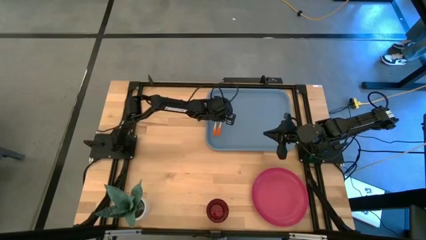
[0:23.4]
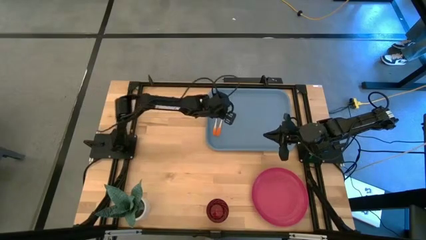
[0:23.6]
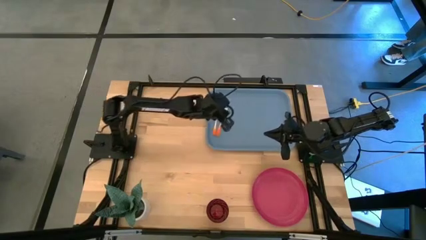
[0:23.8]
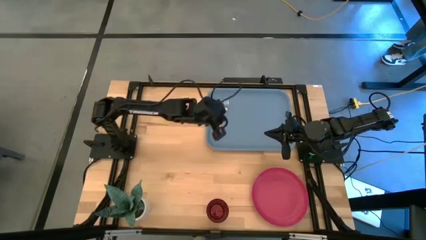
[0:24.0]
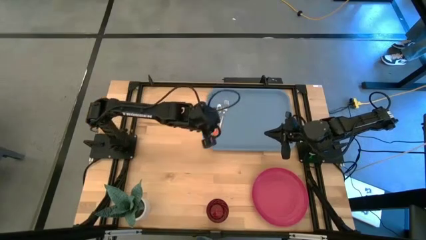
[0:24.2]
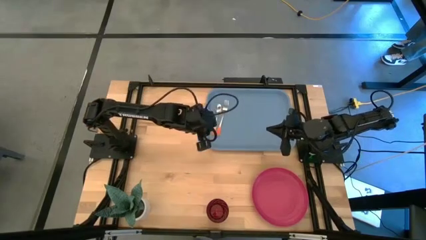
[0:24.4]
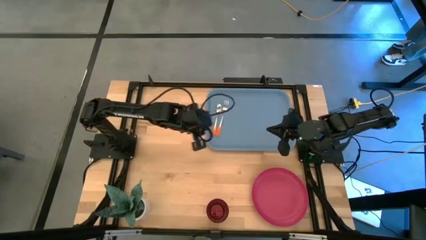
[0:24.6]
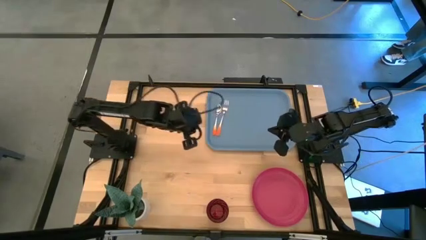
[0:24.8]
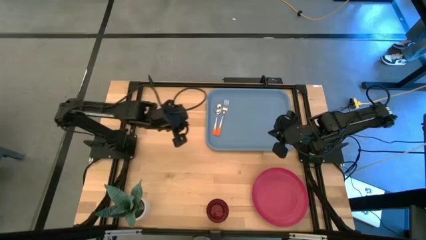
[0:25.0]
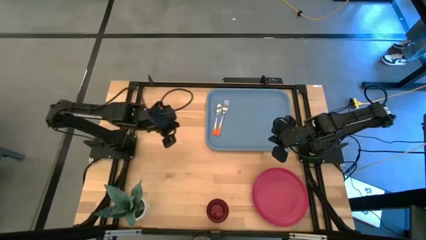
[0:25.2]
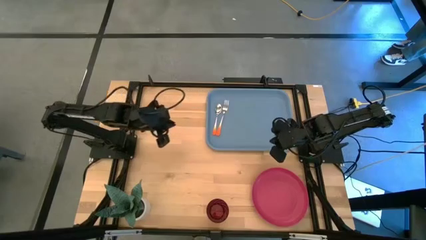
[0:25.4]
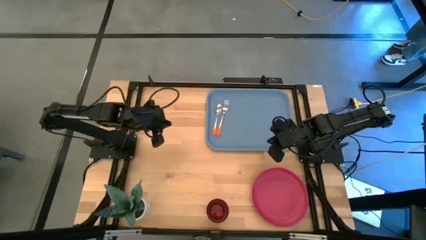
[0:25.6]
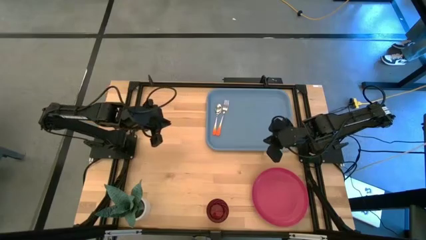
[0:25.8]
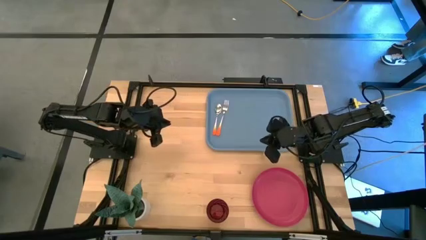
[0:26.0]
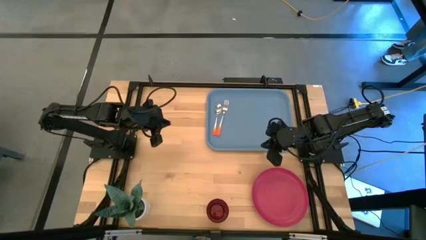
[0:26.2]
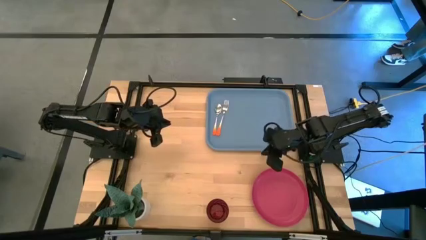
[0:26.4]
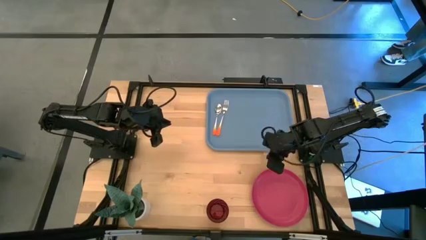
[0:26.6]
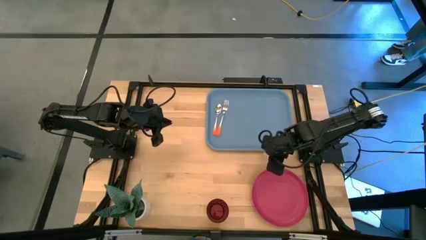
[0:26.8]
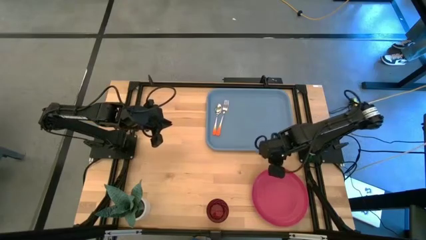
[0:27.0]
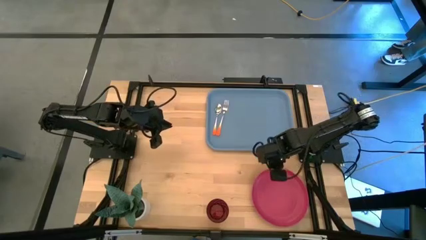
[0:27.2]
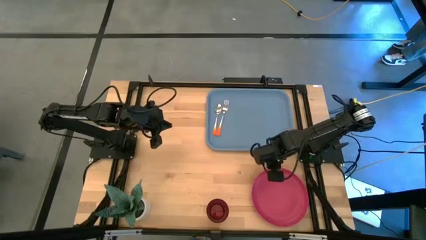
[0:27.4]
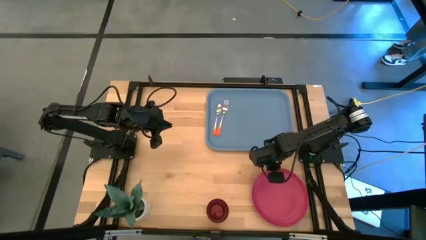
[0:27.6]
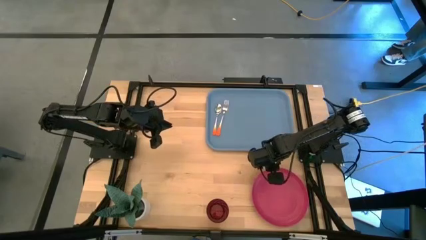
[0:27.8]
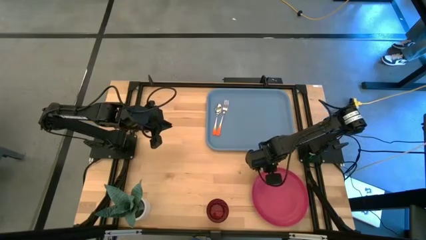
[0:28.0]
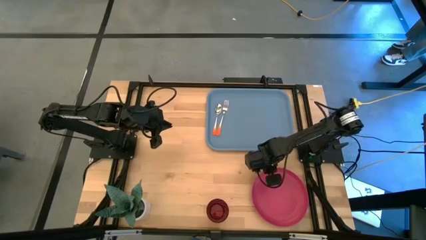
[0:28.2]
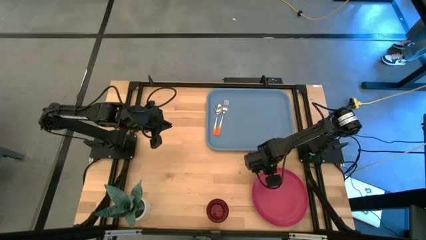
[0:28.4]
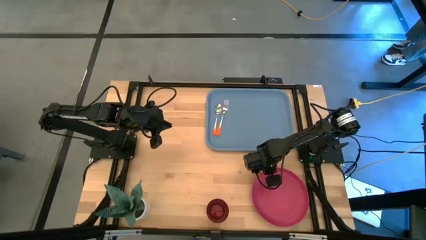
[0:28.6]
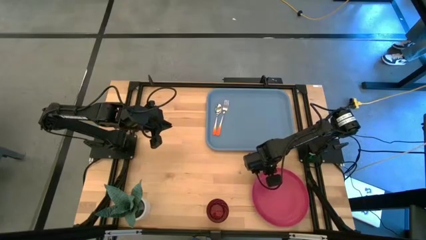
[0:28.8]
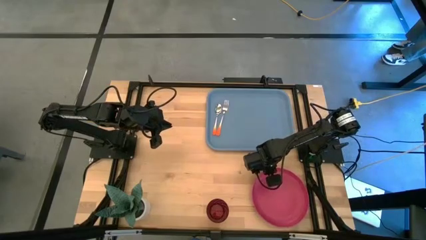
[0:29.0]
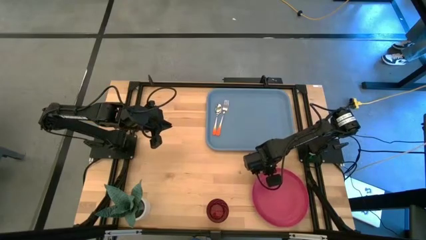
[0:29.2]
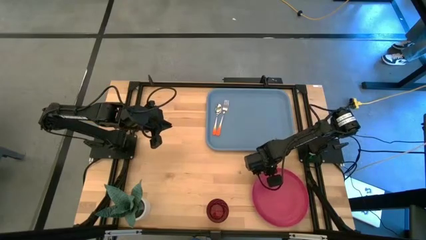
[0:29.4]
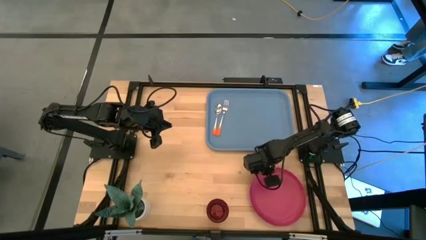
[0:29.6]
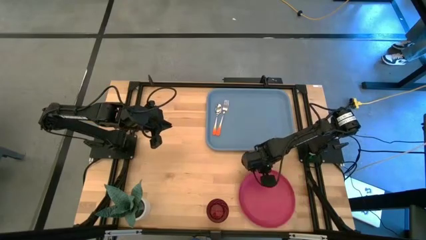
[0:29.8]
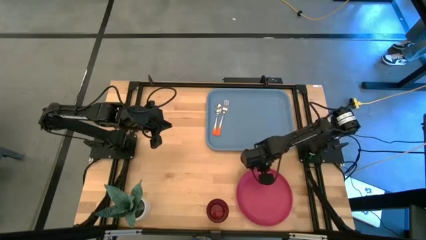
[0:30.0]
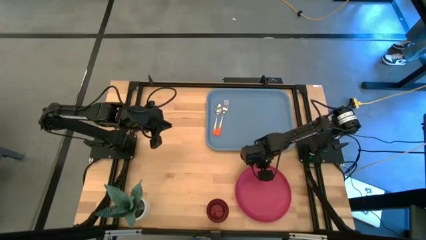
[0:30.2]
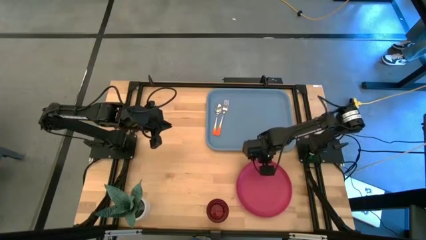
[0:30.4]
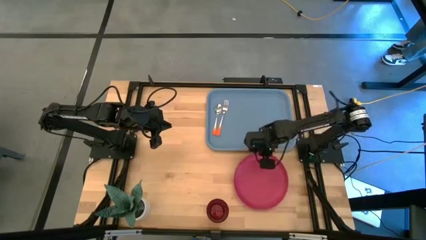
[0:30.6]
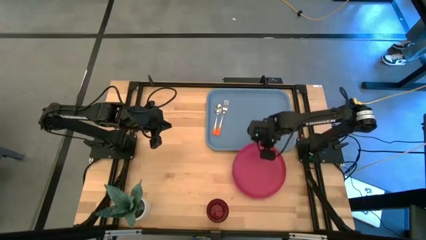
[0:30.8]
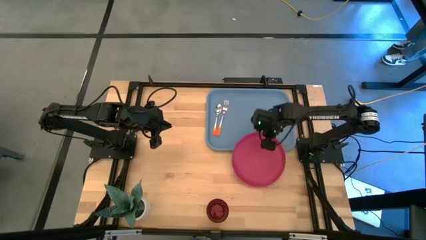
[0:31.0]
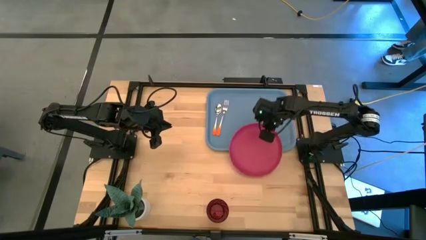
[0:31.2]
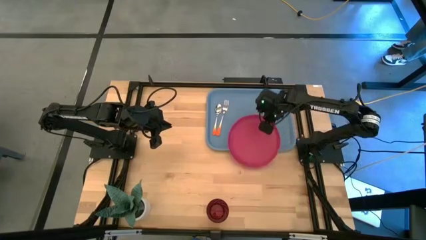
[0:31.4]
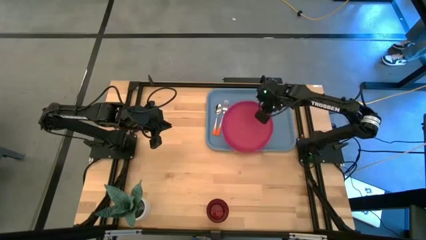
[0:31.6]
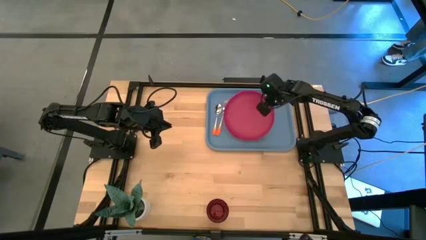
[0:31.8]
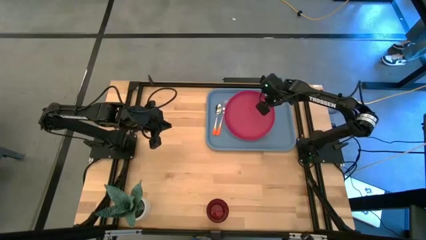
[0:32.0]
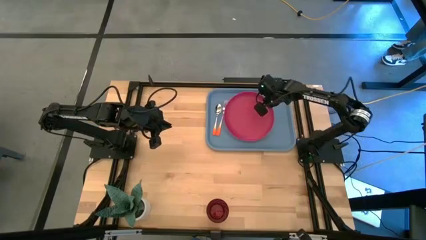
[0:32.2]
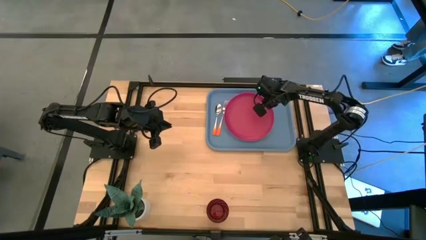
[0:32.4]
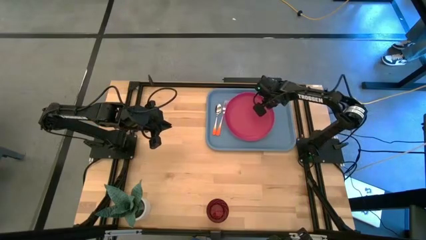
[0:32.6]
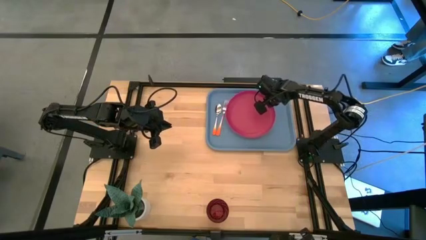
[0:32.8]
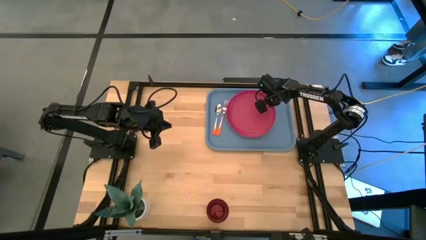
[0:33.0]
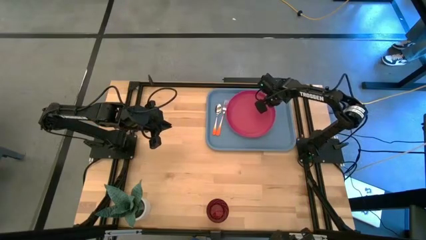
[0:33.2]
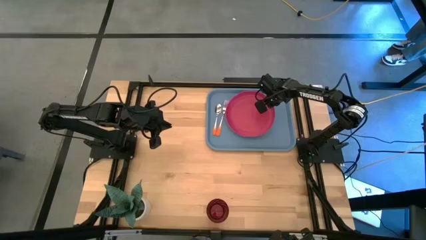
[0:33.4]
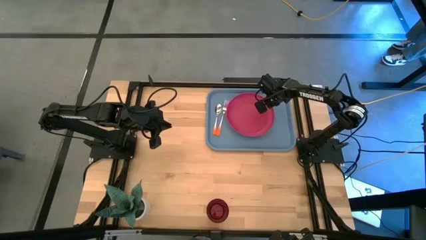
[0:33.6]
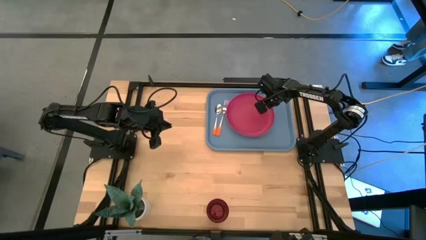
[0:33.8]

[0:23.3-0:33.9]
Task: Pick and place plate/cup/fork/spoon on tray
Put the red plate to the right side of the orange fork on the blue tray

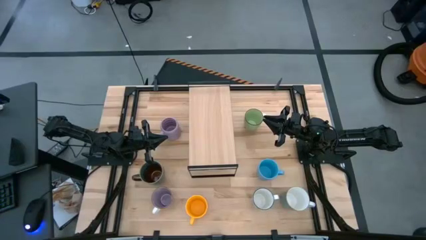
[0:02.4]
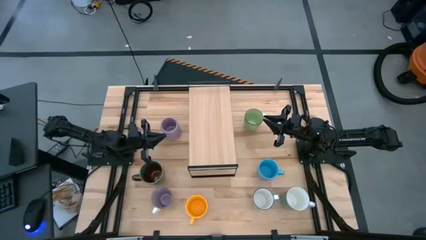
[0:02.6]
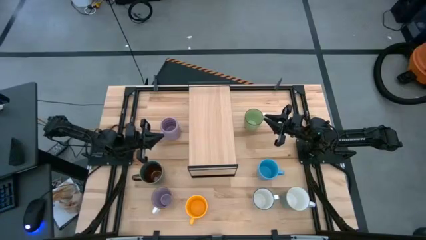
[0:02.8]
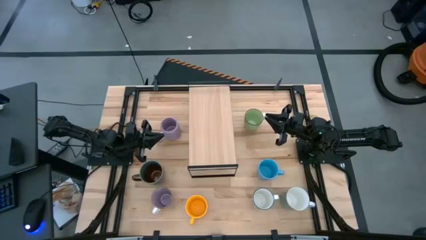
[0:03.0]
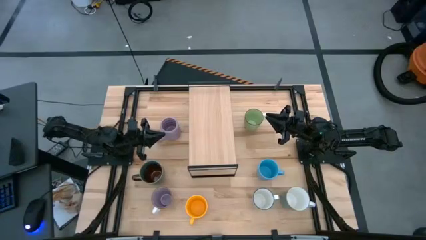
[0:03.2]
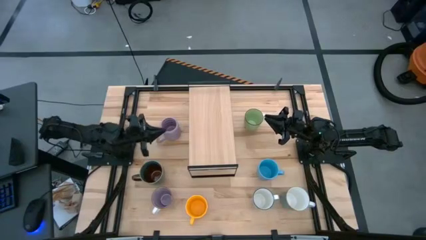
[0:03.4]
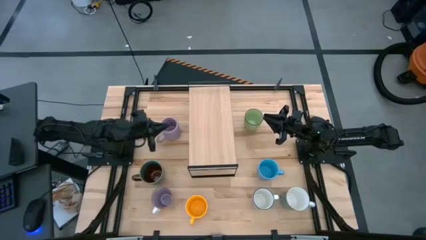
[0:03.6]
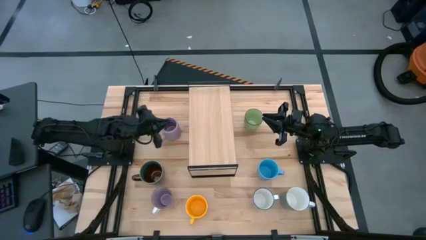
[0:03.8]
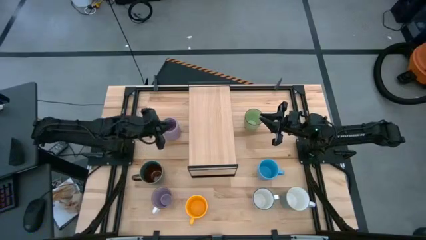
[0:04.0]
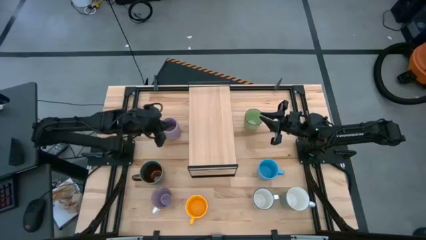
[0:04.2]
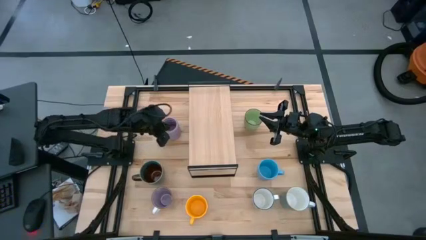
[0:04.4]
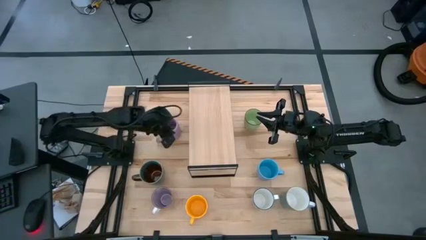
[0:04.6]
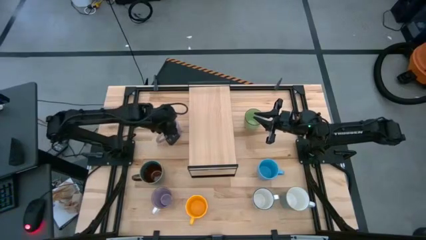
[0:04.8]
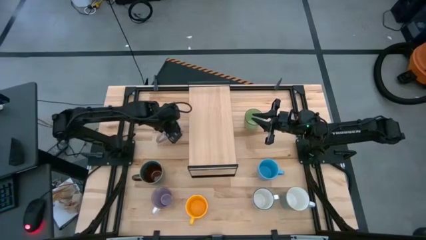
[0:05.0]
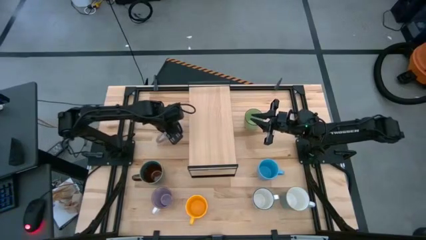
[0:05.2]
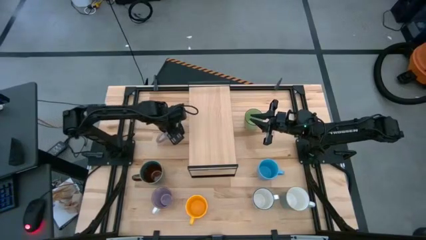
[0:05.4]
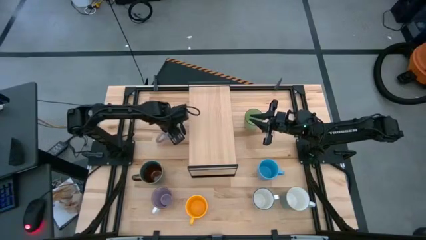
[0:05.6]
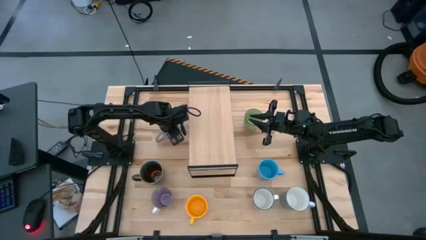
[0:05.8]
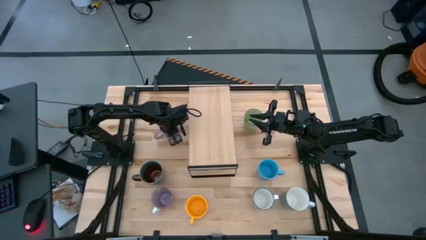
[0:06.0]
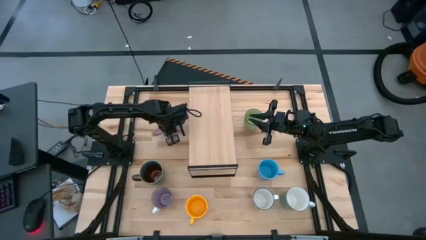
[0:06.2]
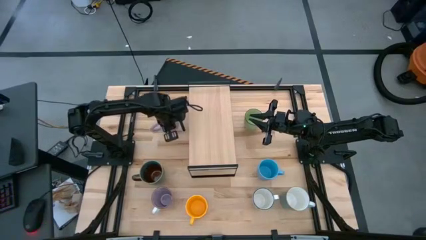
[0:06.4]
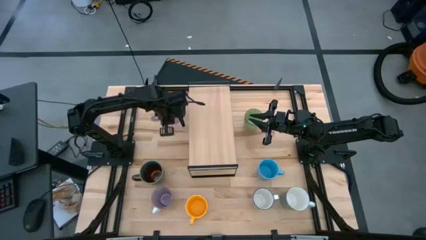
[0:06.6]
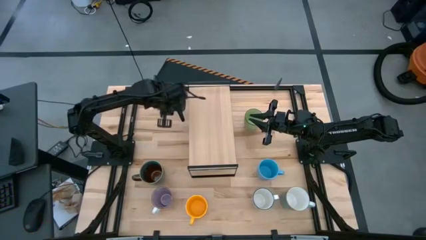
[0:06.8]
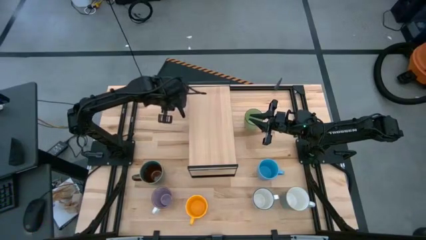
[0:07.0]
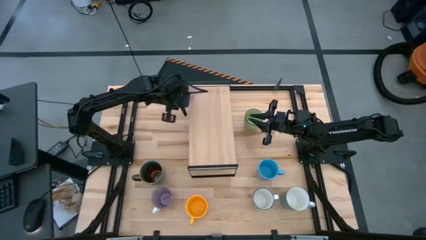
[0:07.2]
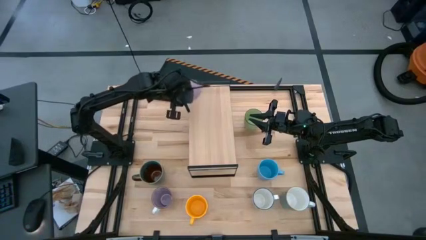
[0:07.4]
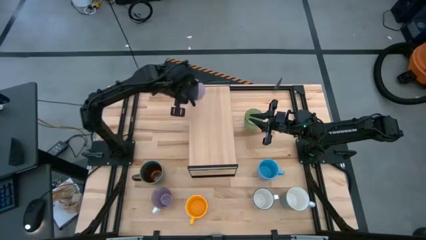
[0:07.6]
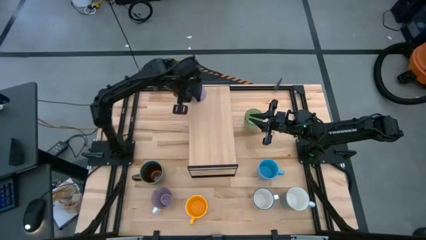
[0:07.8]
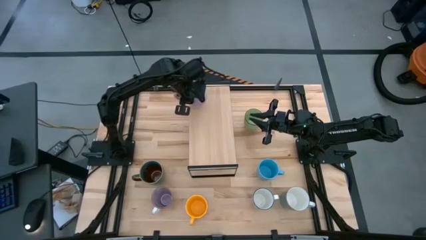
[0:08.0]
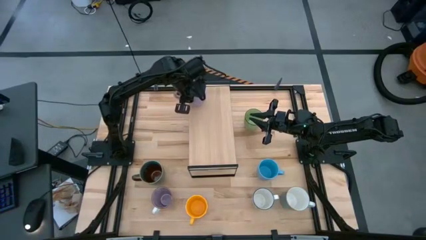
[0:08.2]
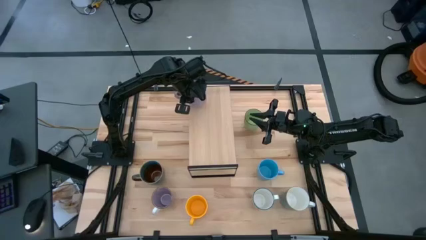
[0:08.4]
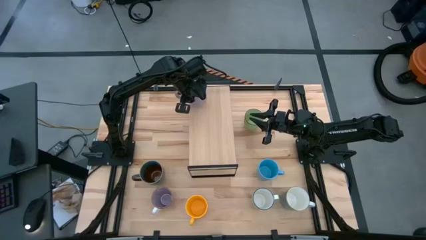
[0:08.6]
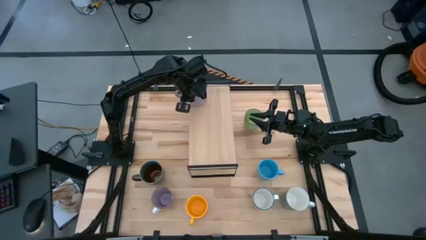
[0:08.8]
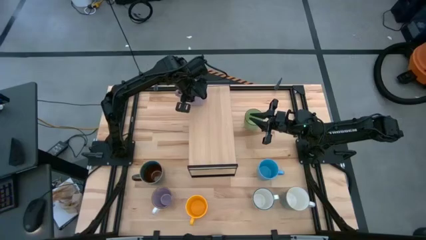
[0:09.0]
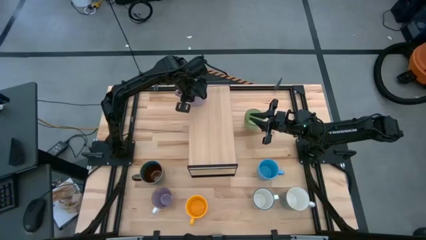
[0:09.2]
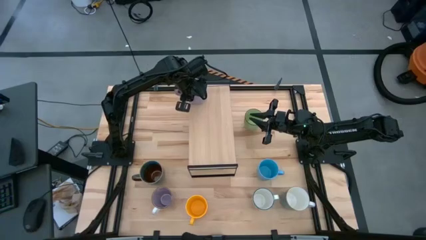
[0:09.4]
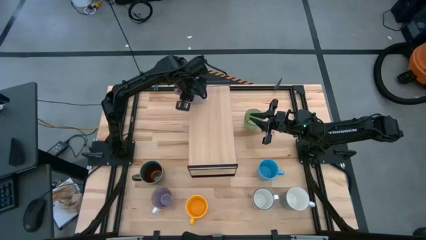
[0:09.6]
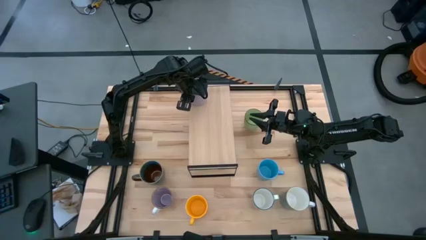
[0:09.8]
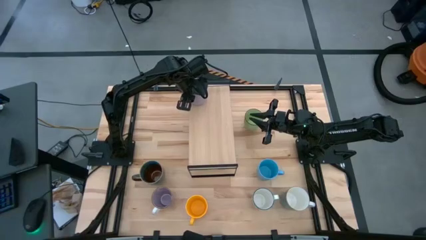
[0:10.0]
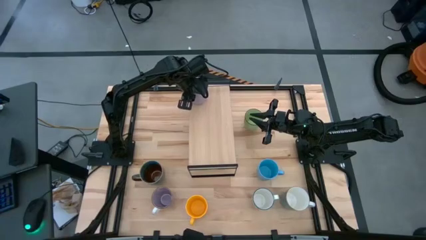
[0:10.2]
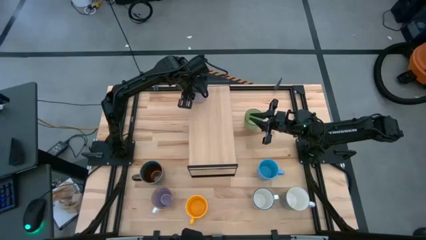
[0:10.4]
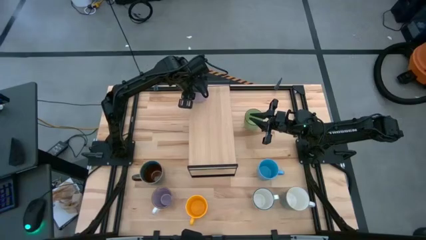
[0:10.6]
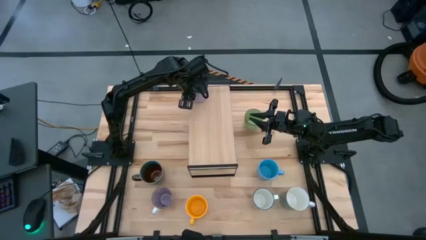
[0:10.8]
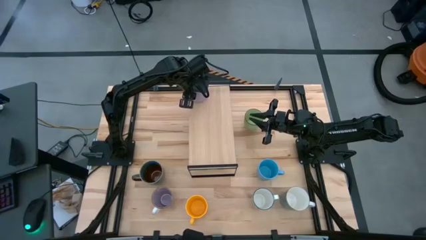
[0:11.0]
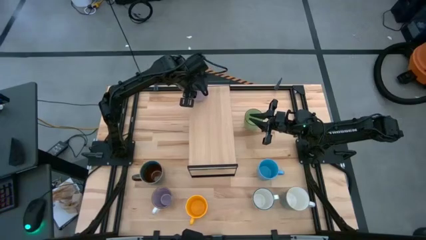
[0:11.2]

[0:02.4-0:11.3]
Task: Place coffee mugs
Put the top purple mug on the shelf
